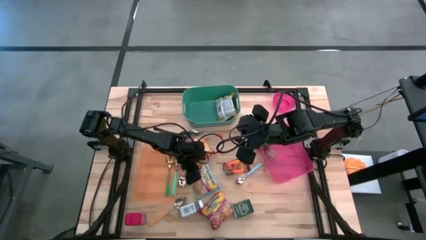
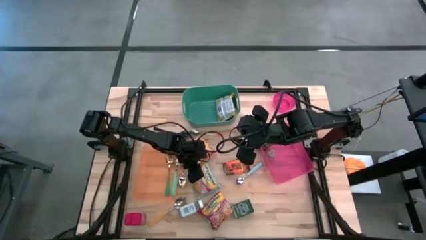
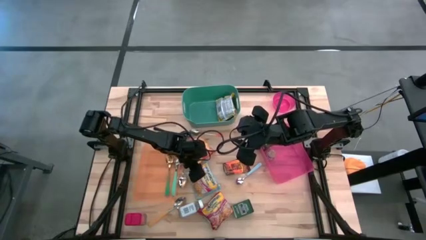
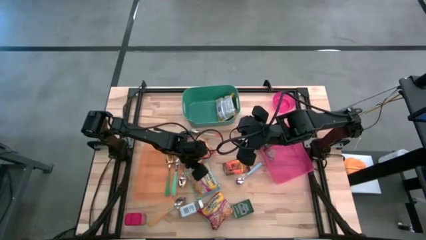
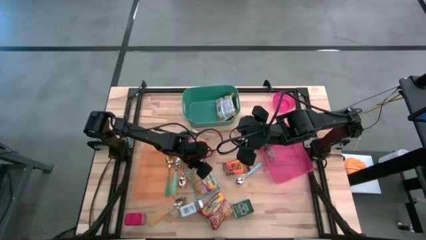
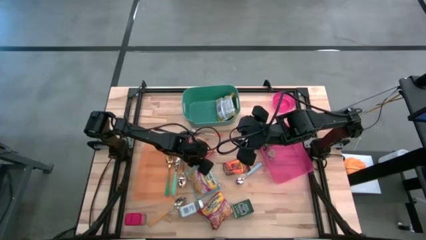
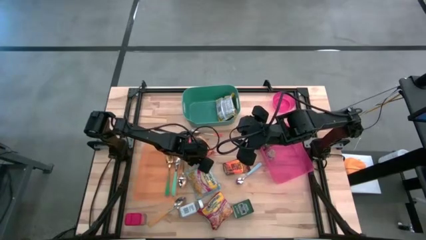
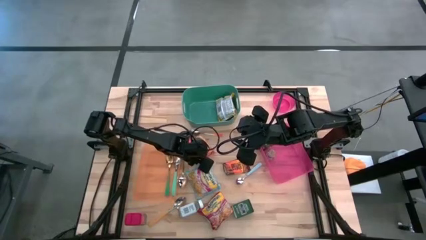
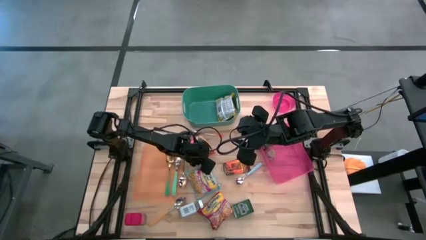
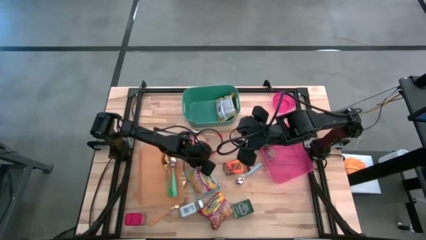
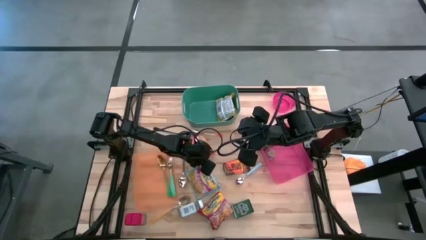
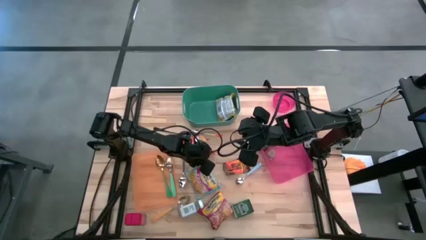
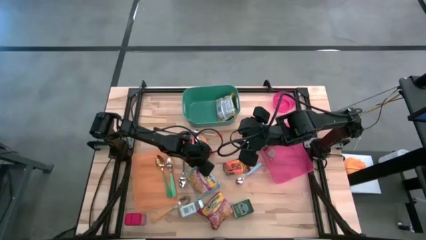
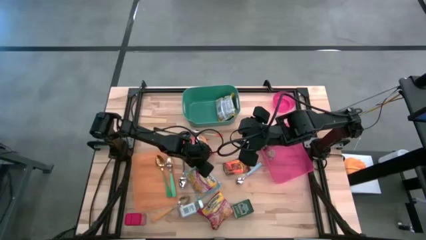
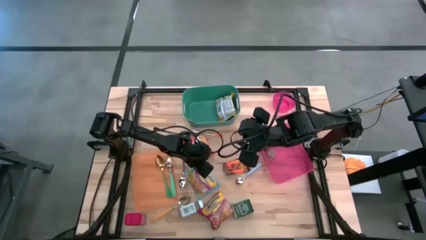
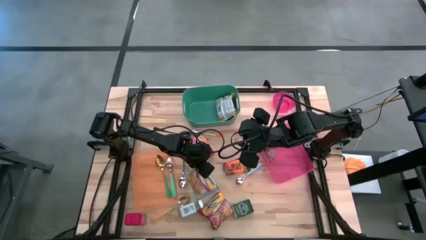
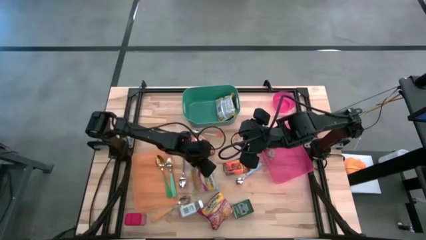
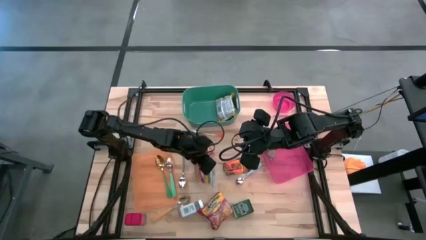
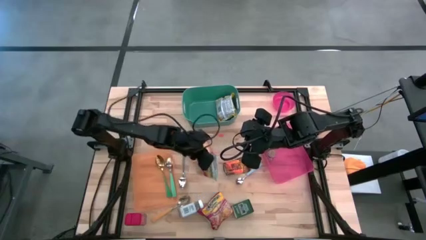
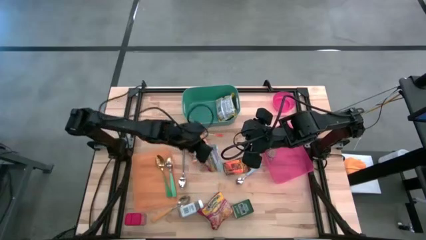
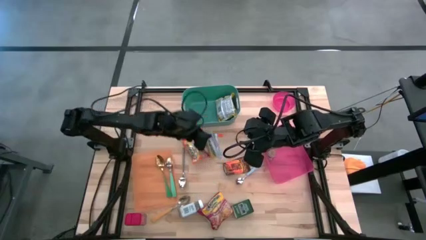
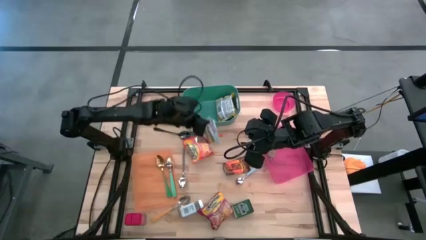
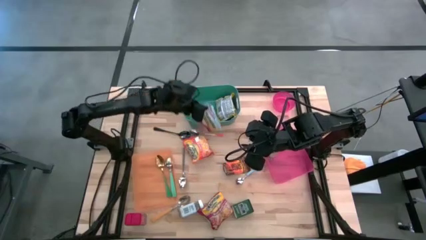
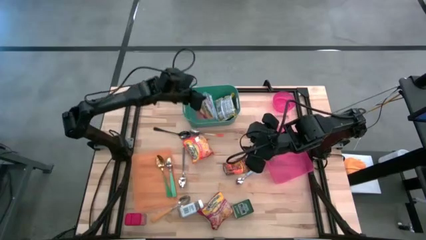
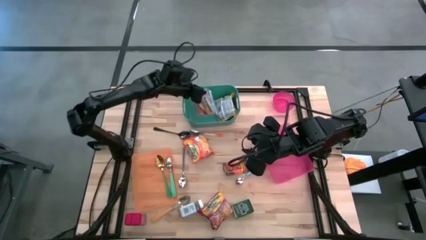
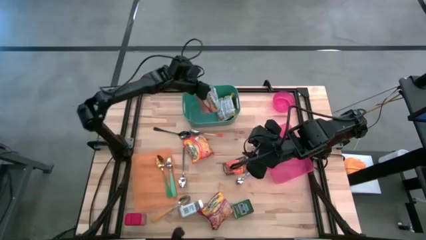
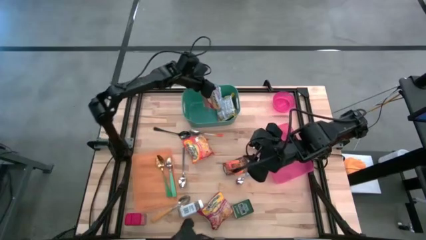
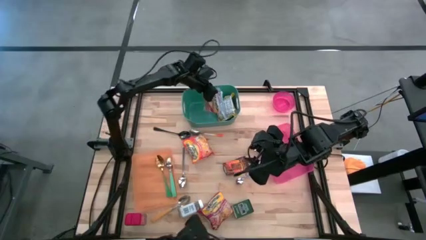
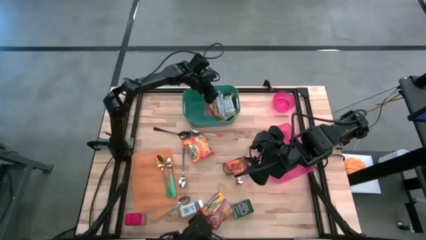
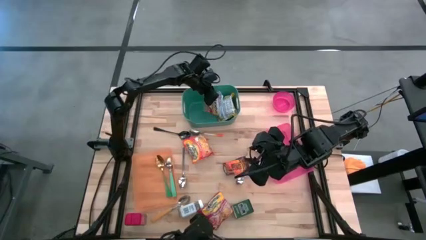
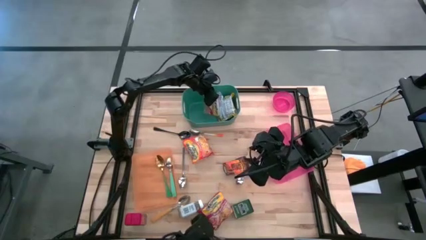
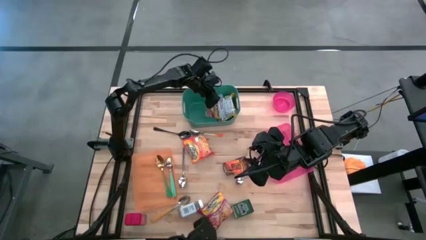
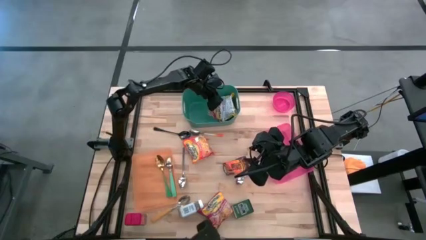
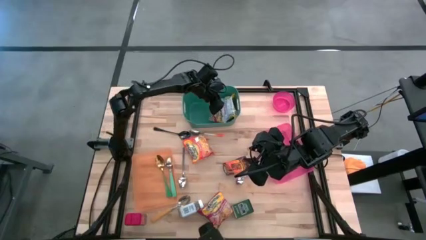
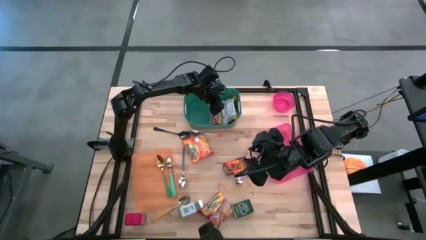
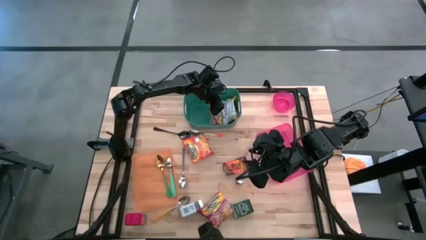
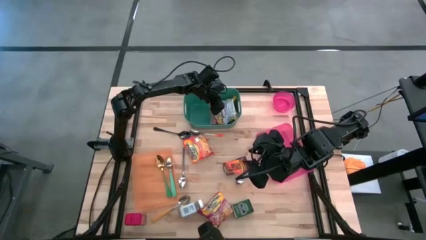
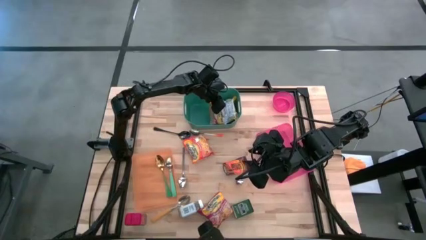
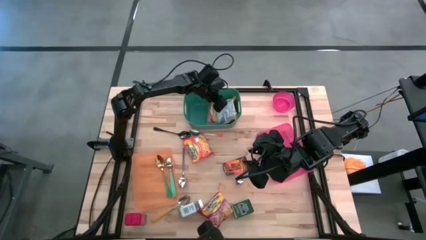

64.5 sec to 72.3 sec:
Put the blue noodle pack into the green bin
